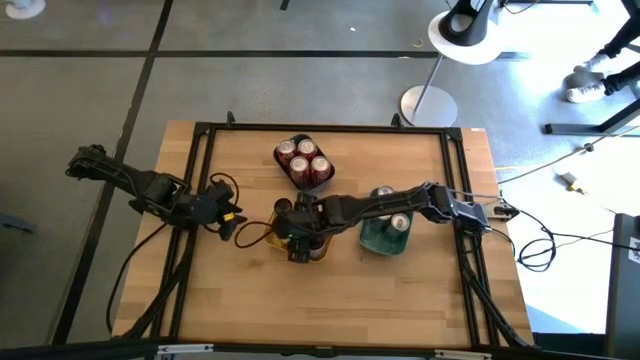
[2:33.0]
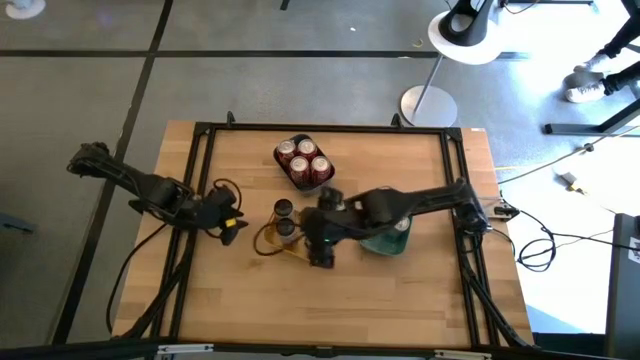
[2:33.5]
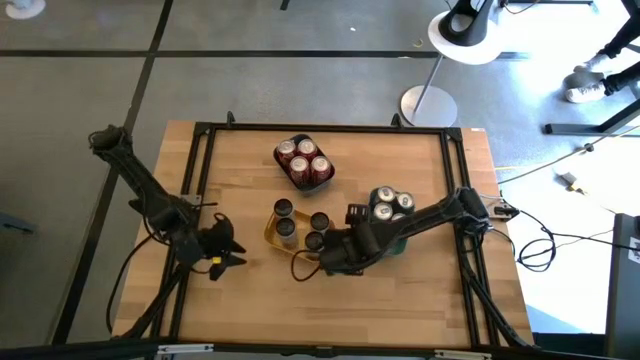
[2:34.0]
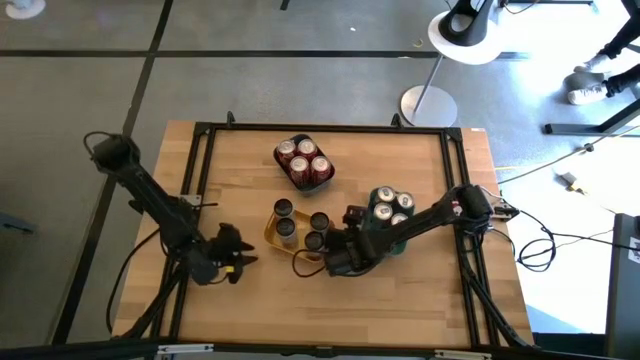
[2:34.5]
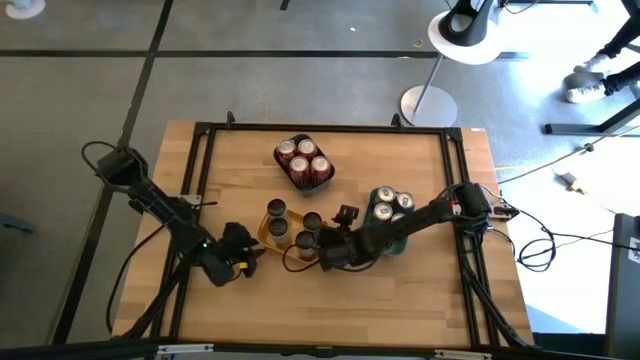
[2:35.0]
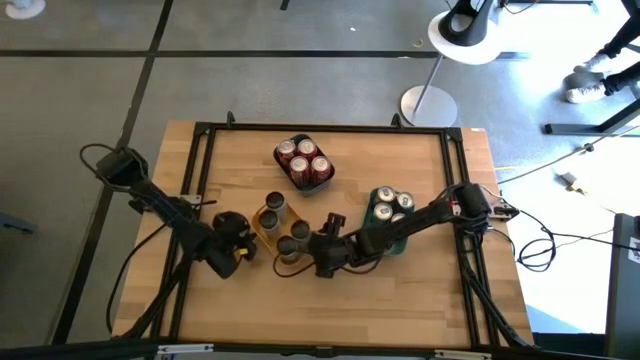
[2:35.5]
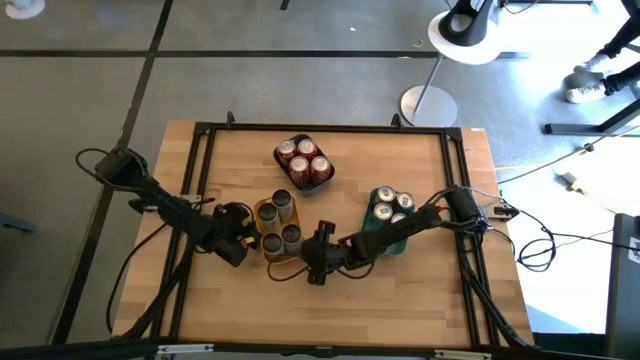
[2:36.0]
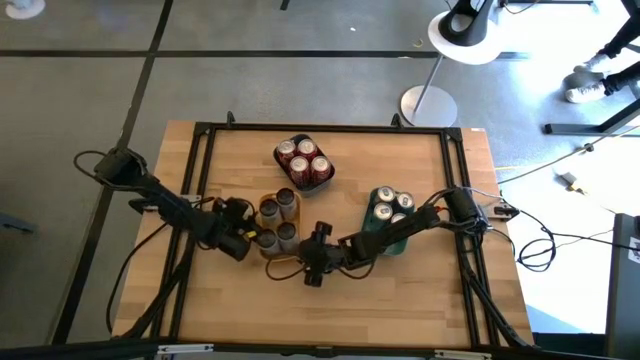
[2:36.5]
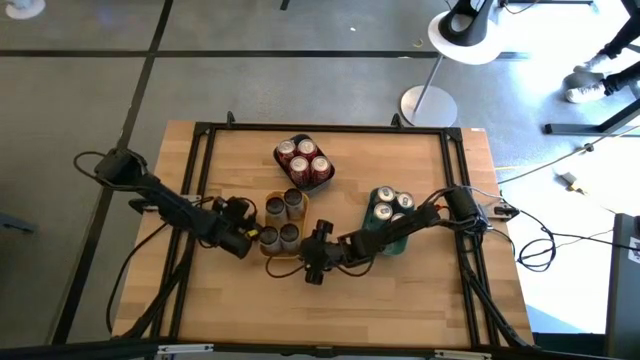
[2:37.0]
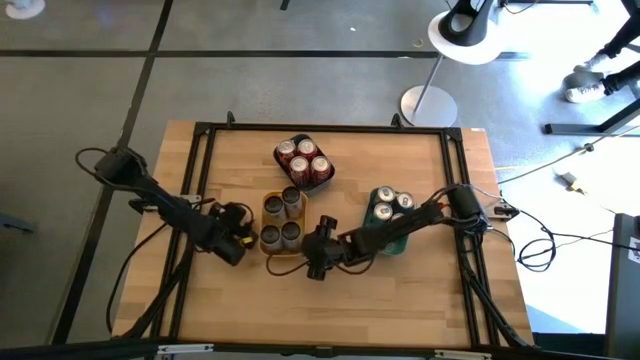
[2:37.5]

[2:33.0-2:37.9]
Task: Sort soda cans
Adjust the yellow bin

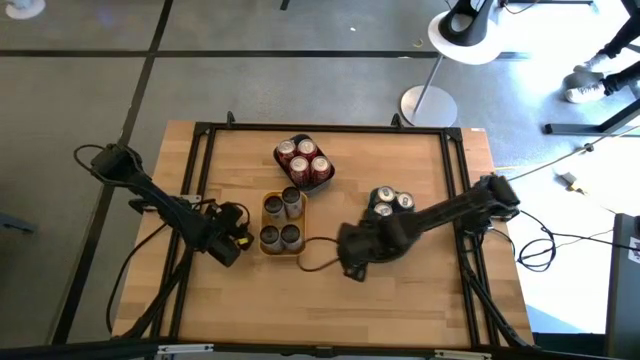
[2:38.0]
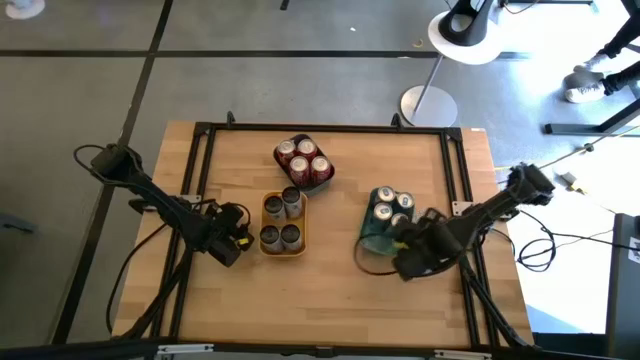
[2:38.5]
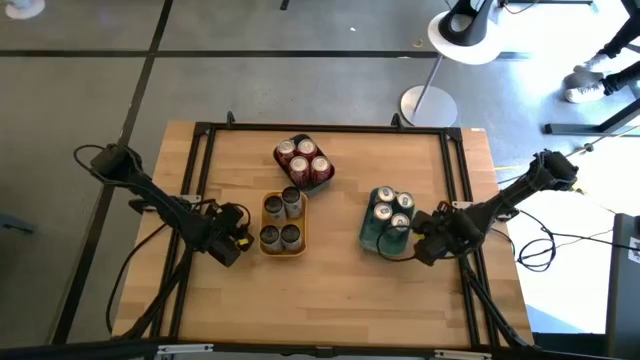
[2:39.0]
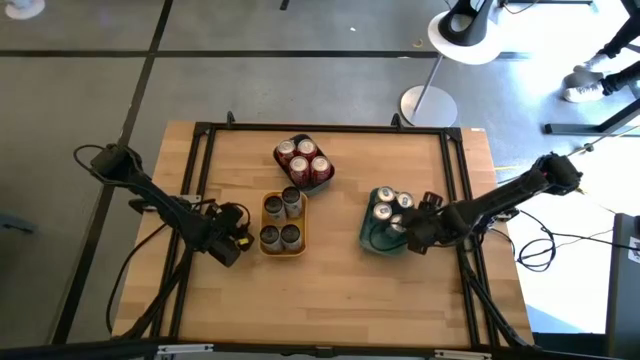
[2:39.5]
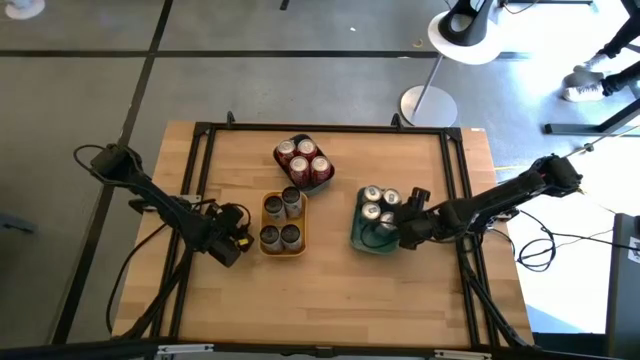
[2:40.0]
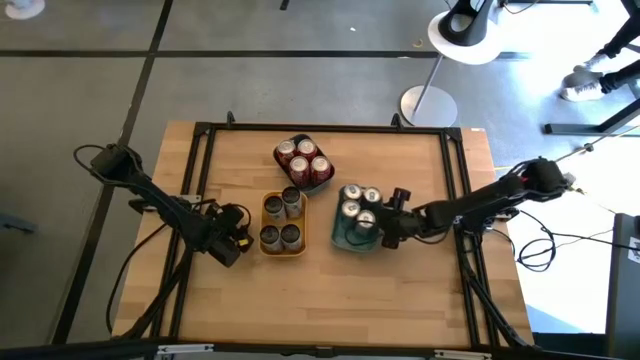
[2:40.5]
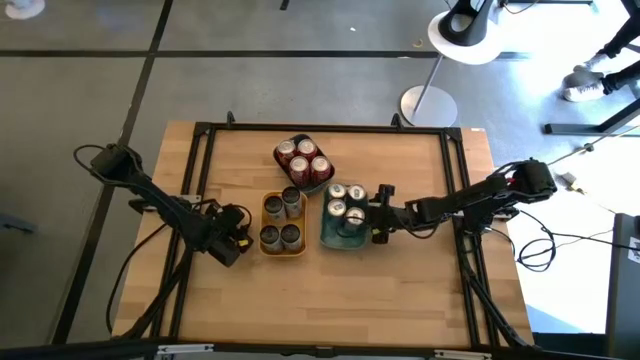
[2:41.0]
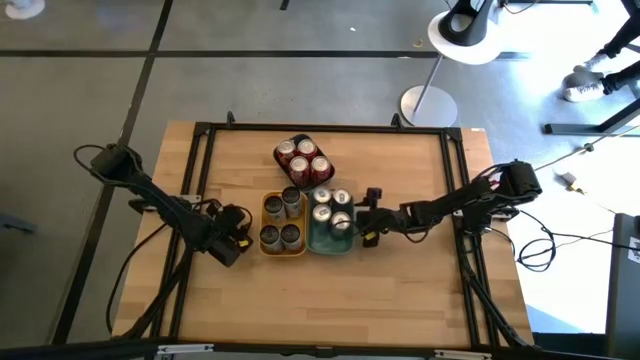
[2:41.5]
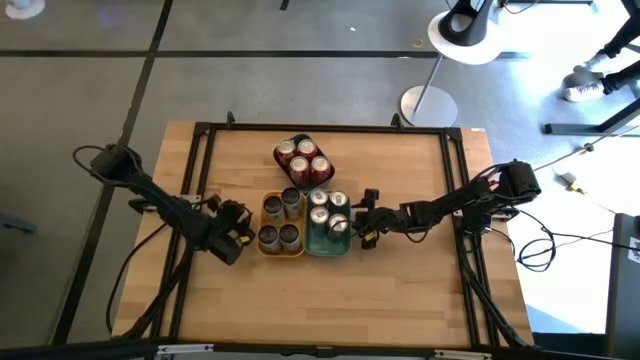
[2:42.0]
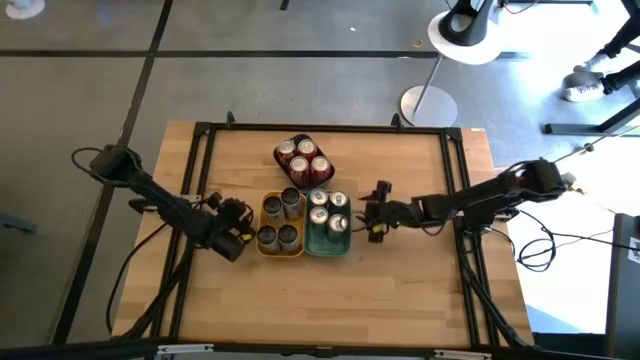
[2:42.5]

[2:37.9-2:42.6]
Move the green bin to the center of the table

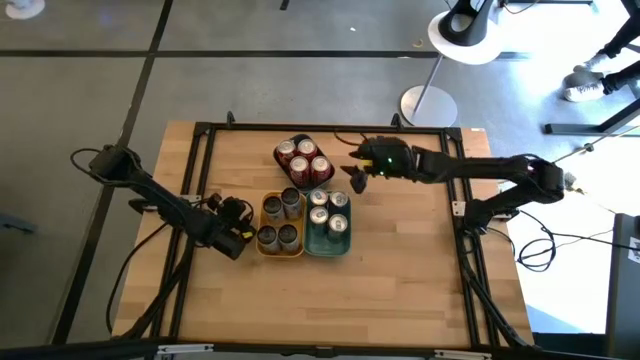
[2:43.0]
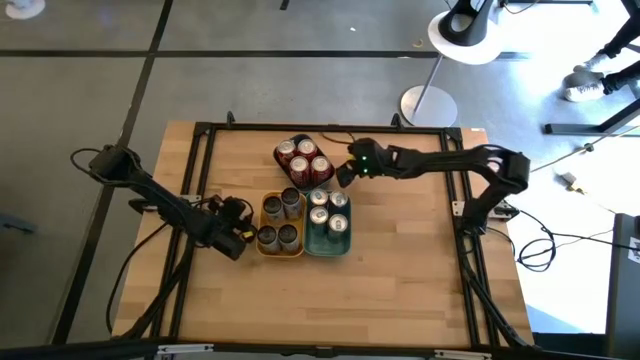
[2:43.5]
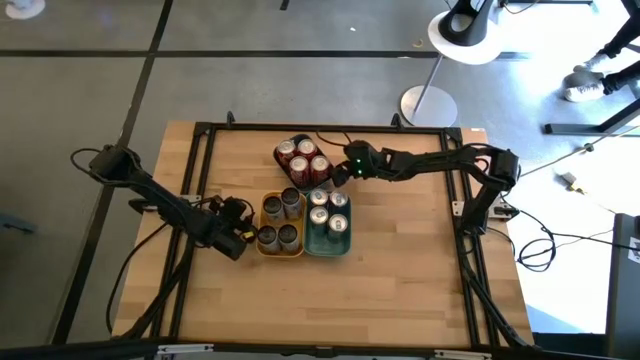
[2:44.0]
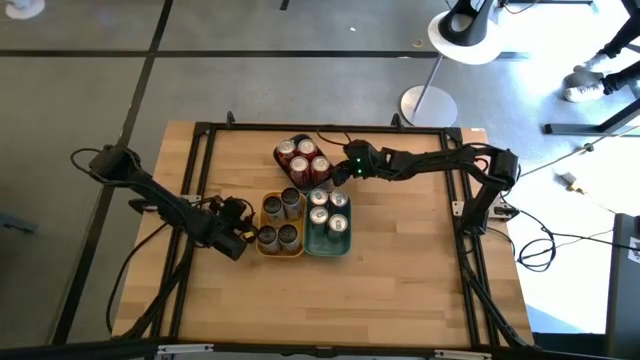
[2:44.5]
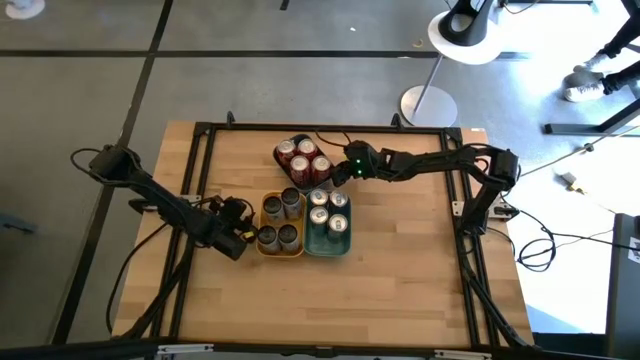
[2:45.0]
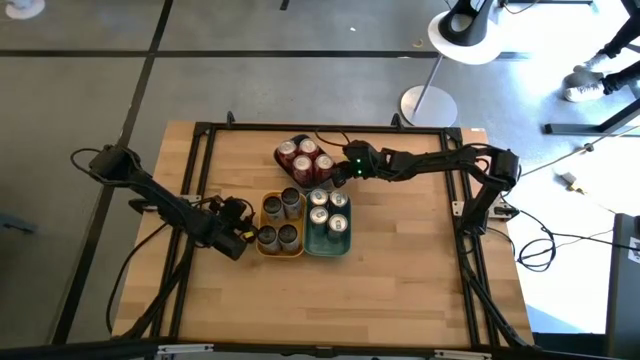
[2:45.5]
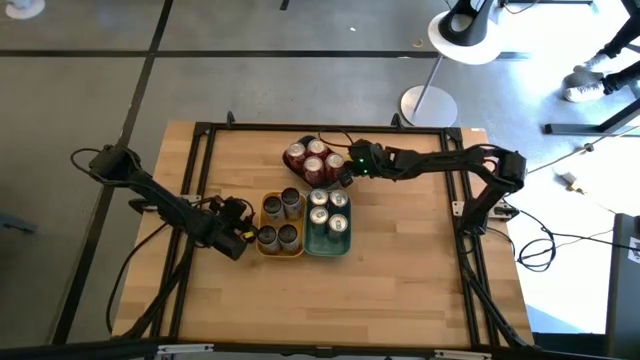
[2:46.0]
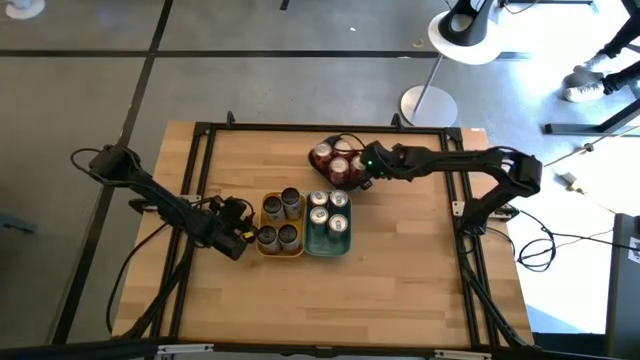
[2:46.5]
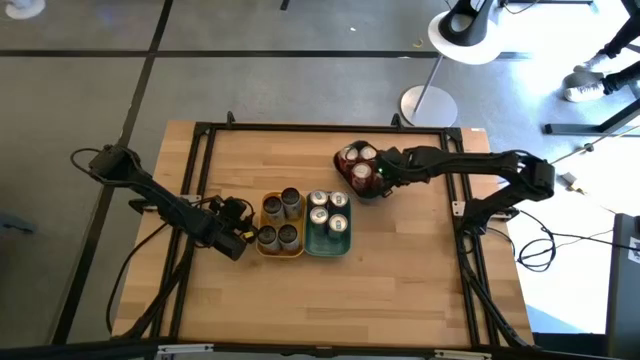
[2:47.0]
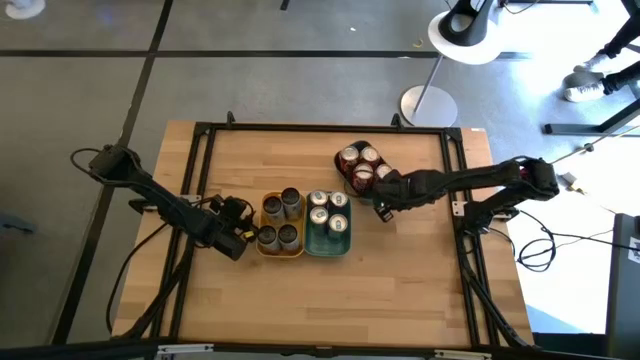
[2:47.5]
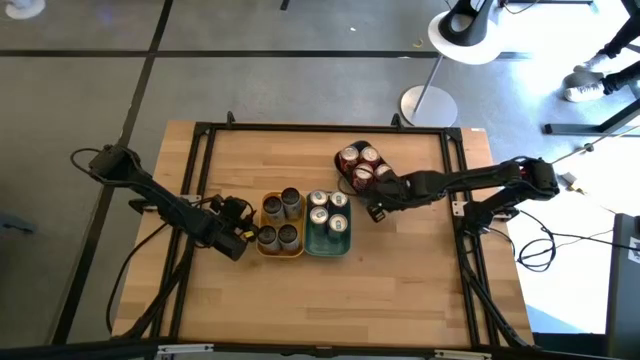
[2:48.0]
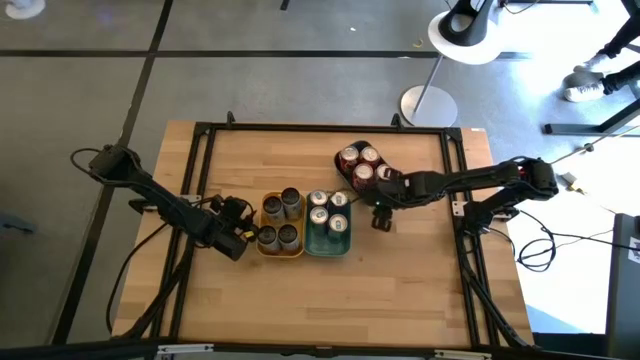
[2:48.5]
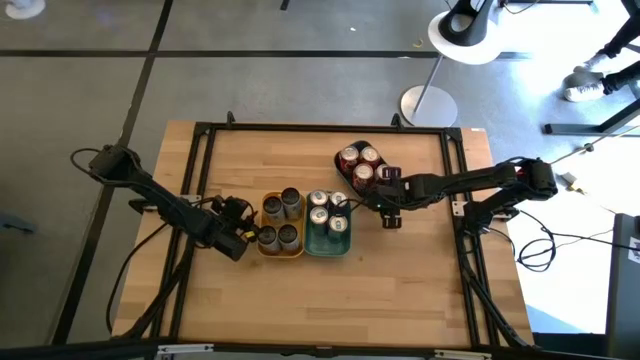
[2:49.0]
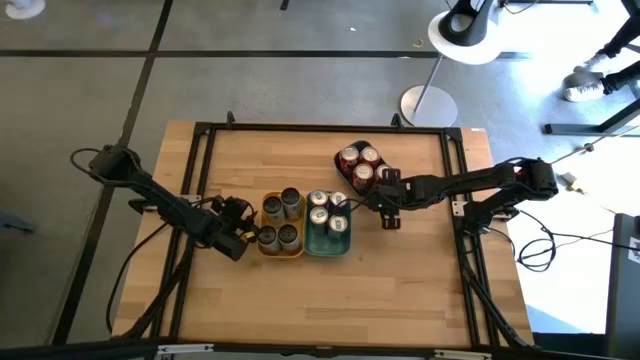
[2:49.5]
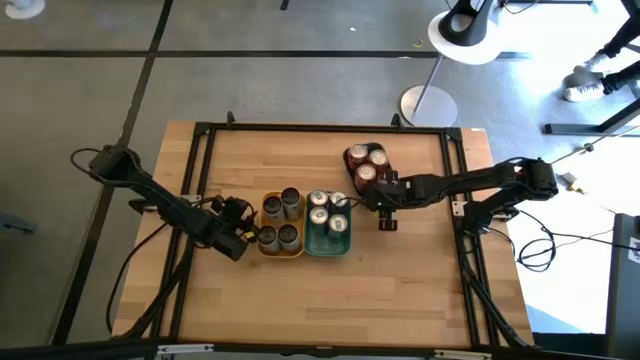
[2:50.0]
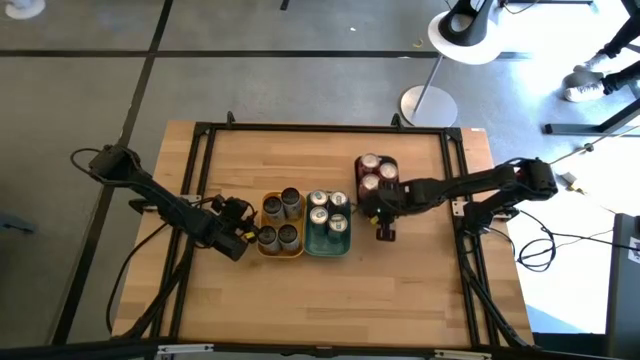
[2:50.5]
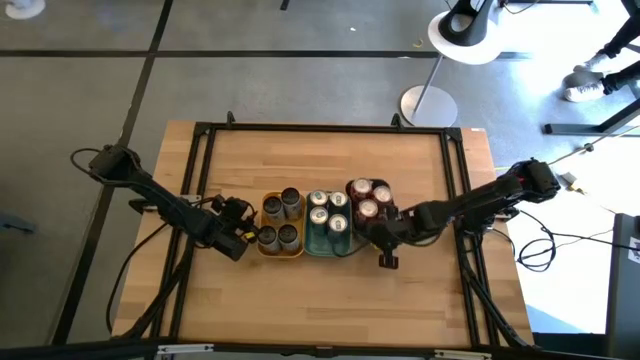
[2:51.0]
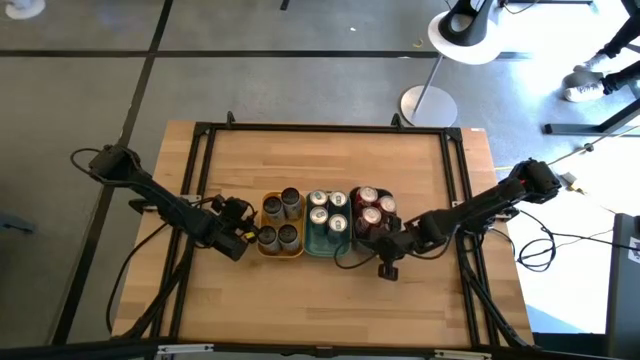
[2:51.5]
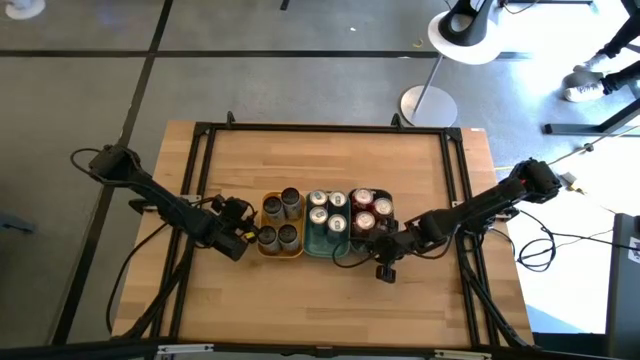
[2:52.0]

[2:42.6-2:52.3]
Move the blue bin to the center of the table beside the green bin
